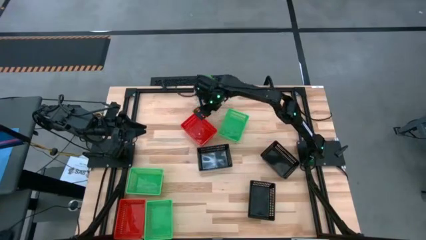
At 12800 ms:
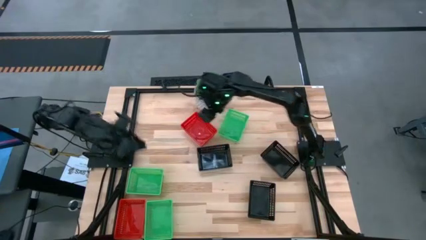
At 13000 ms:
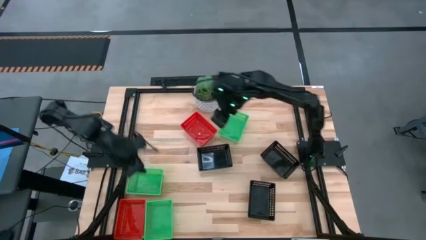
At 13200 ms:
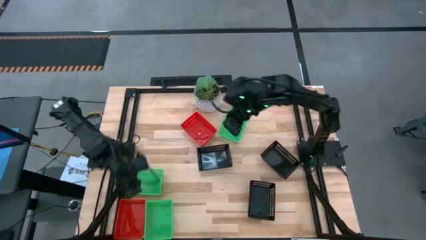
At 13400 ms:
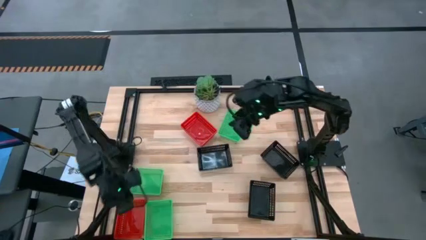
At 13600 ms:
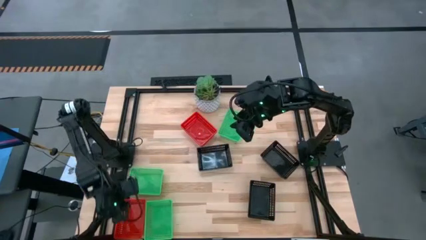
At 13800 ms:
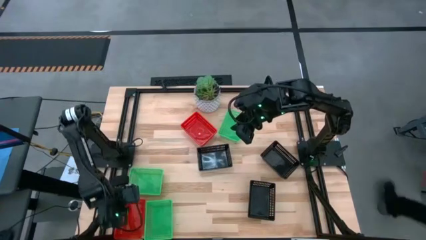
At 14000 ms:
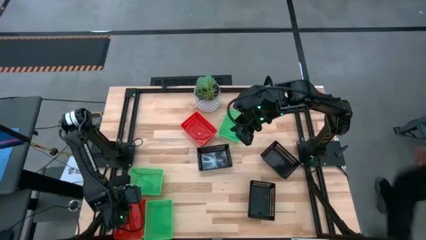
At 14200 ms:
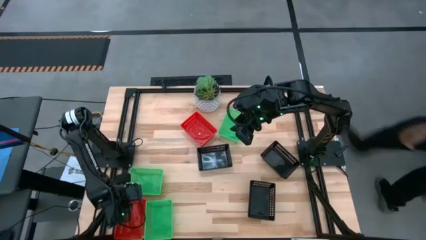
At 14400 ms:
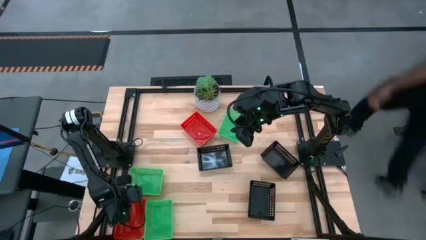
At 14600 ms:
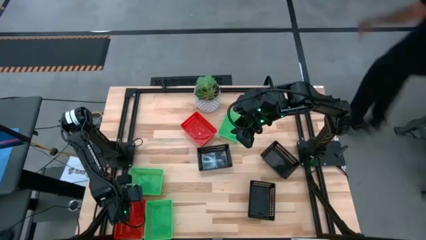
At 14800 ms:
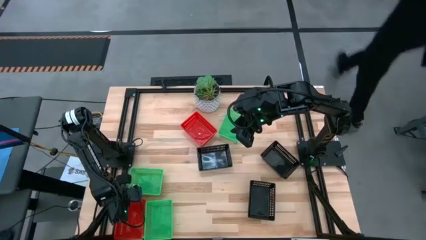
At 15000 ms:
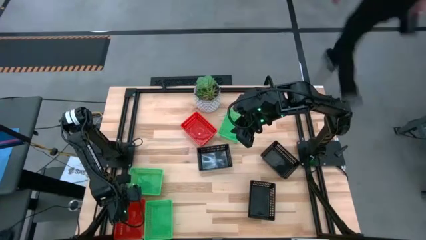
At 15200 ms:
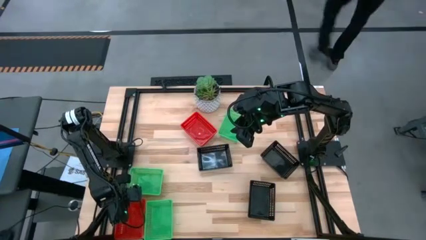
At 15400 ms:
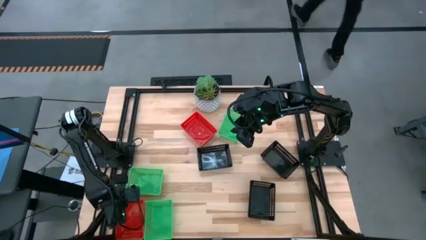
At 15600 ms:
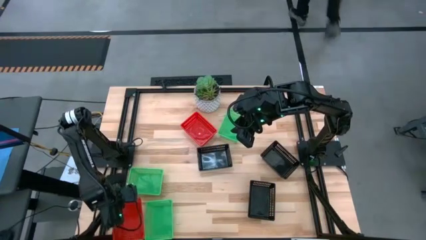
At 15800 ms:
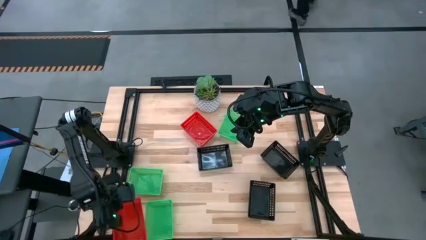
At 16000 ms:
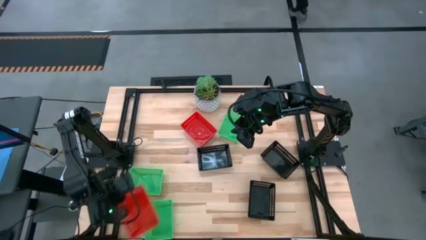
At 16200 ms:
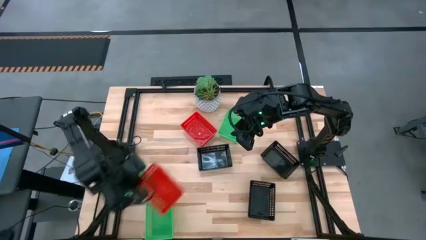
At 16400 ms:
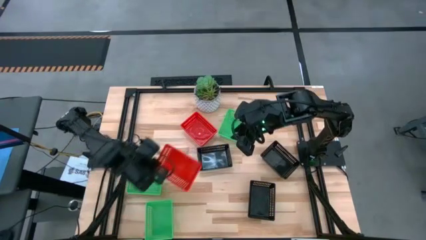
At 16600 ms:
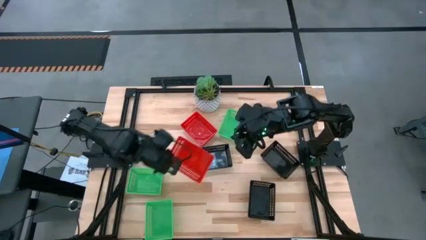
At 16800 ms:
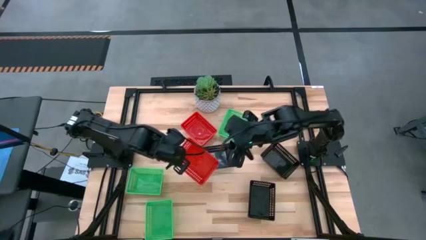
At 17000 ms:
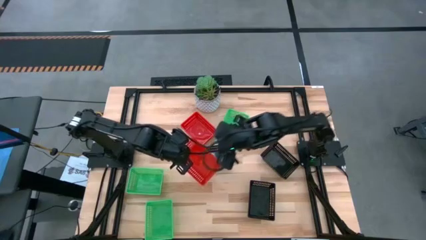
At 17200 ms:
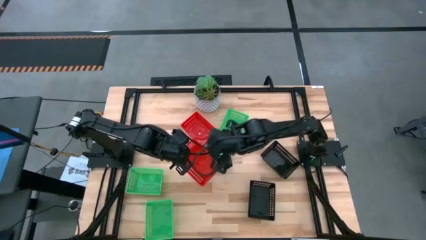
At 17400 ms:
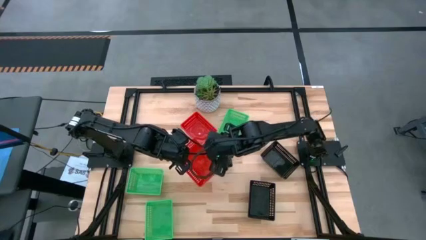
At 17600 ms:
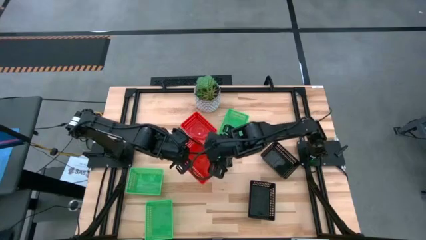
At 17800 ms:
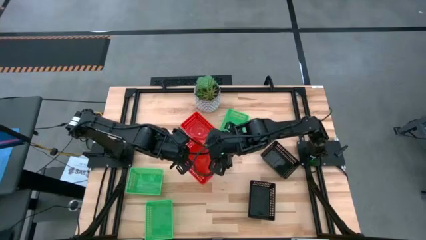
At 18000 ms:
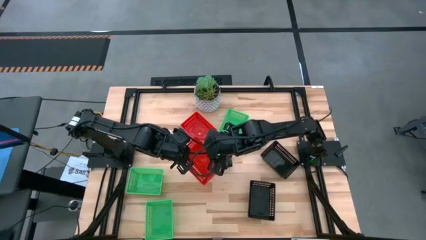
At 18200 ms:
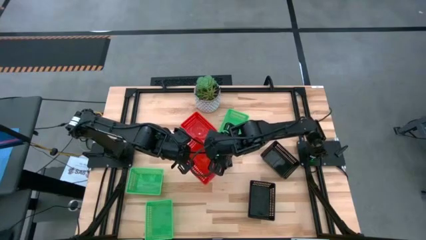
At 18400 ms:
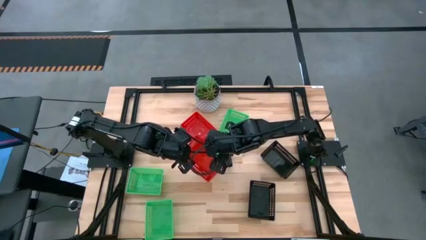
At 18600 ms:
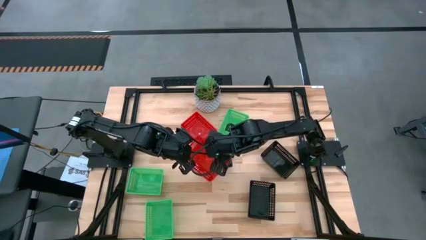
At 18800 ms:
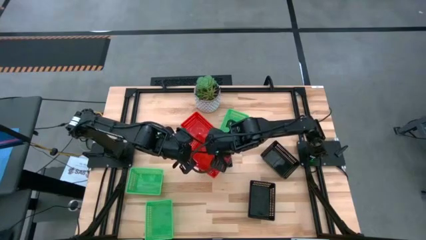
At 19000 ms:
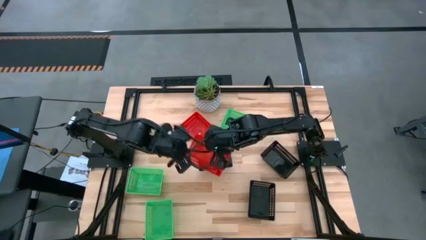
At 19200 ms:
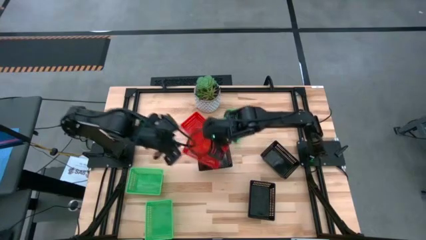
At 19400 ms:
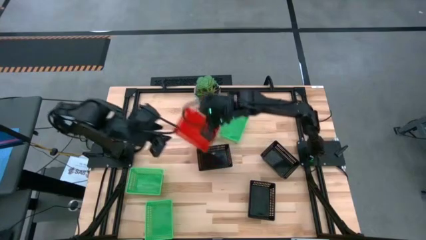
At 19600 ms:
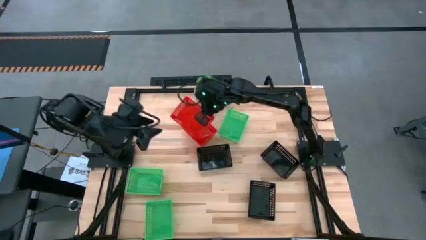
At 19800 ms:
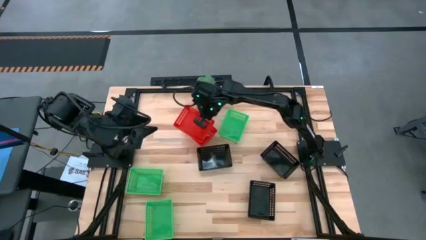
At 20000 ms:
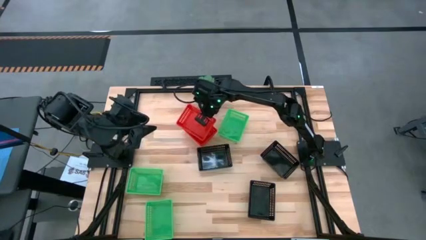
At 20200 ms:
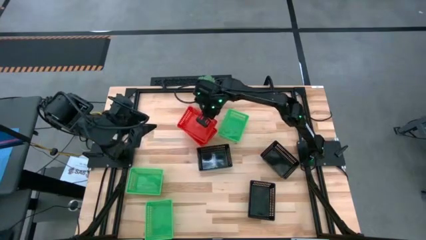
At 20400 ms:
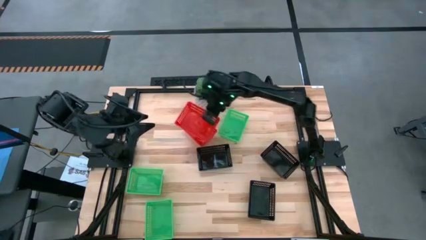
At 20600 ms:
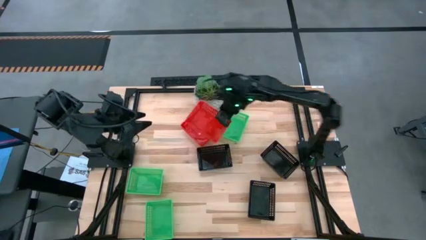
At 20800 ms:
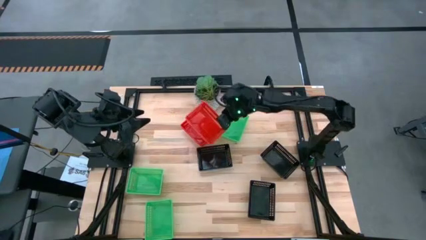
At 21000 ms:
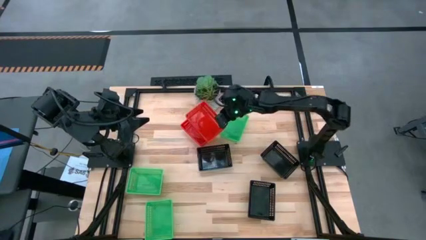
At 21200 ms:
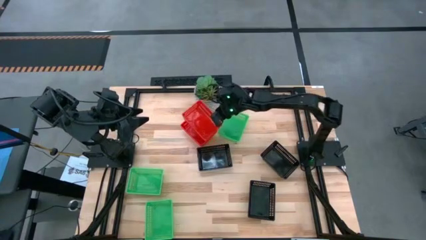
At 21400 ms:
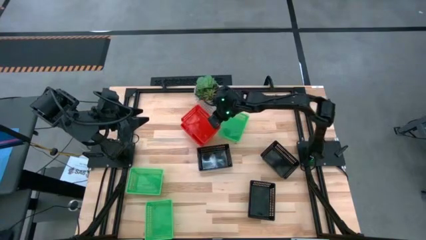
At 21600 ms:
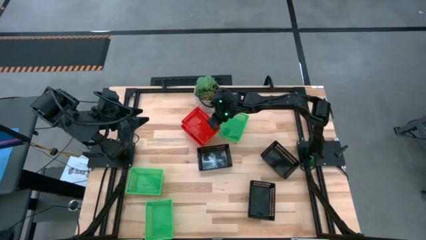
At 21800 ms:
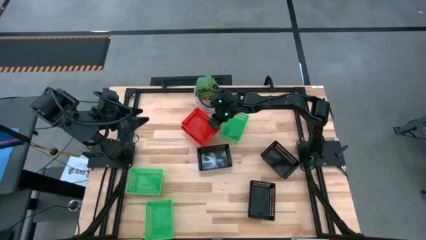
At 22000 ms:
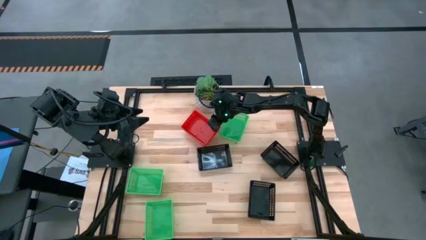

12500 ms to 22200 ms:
Stack the bottom red bin on the top red bins

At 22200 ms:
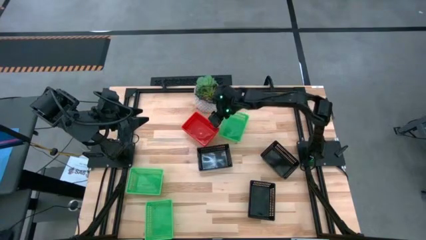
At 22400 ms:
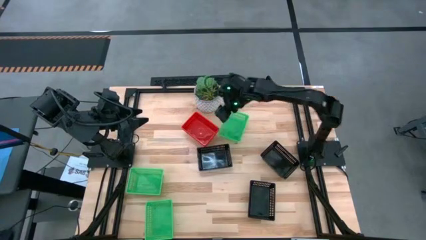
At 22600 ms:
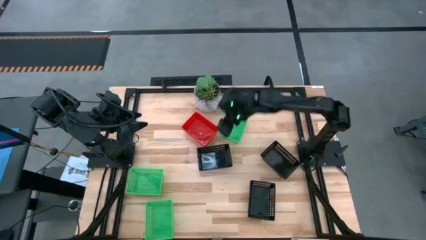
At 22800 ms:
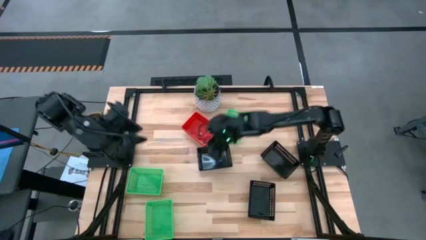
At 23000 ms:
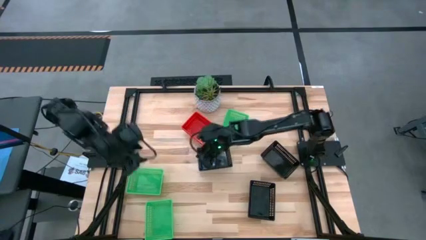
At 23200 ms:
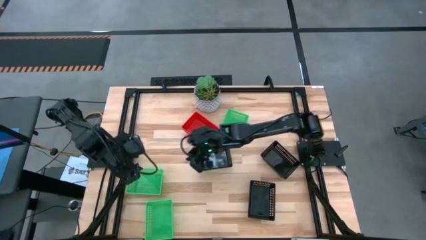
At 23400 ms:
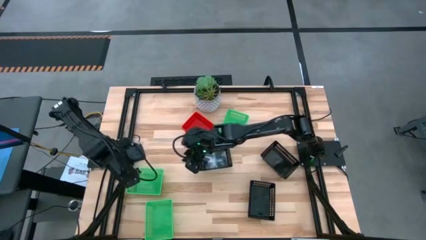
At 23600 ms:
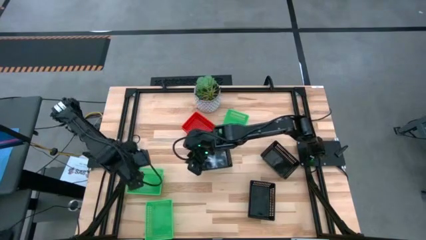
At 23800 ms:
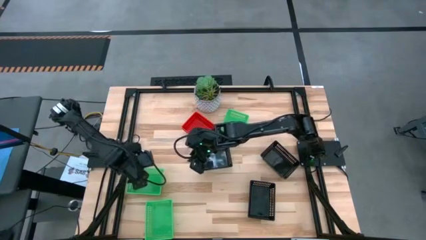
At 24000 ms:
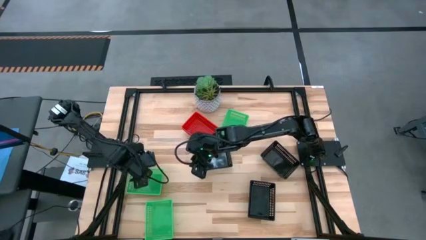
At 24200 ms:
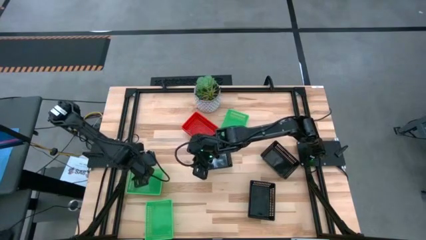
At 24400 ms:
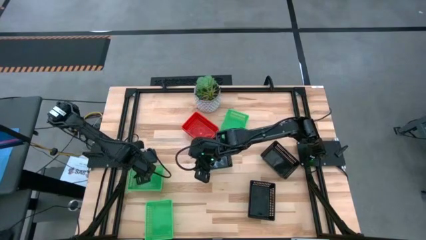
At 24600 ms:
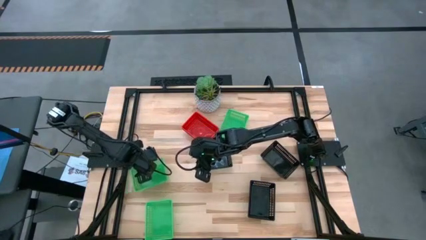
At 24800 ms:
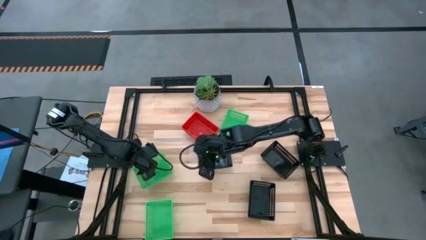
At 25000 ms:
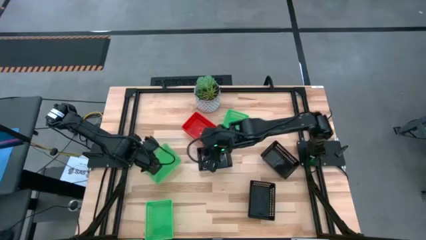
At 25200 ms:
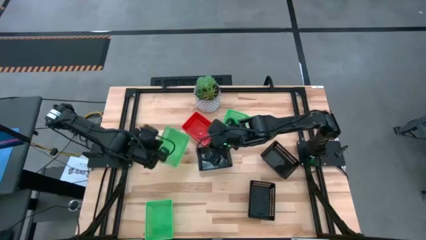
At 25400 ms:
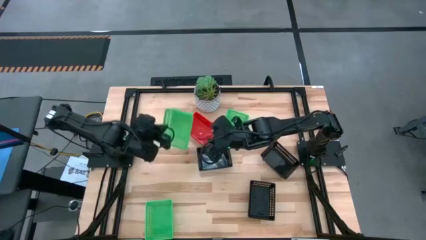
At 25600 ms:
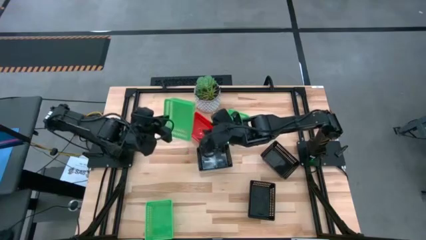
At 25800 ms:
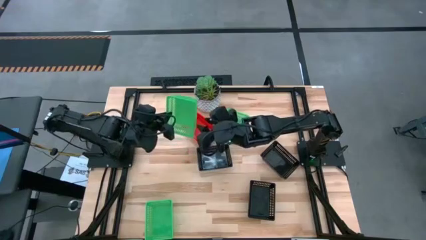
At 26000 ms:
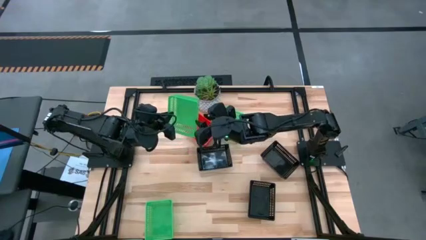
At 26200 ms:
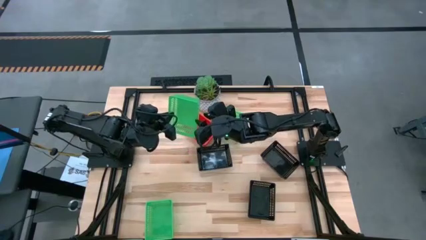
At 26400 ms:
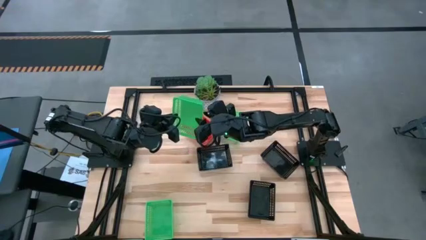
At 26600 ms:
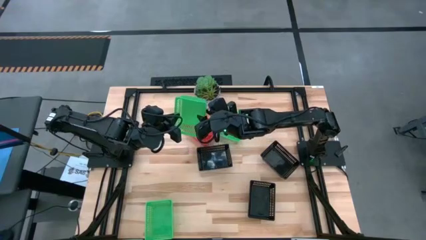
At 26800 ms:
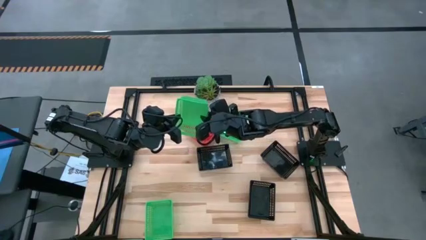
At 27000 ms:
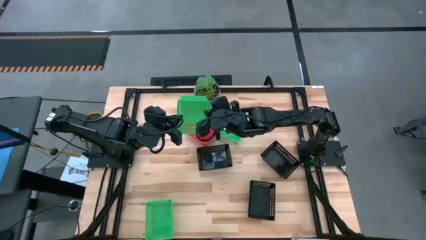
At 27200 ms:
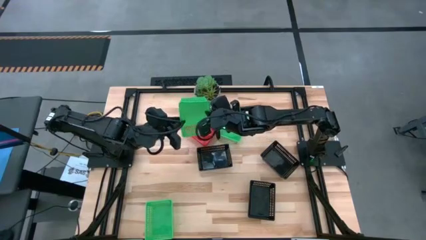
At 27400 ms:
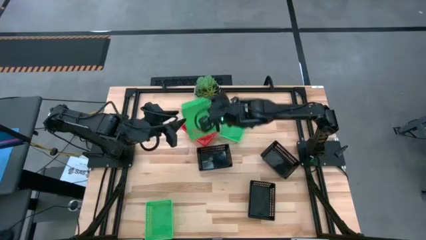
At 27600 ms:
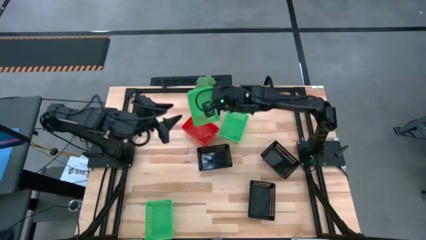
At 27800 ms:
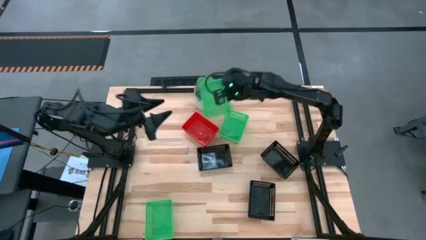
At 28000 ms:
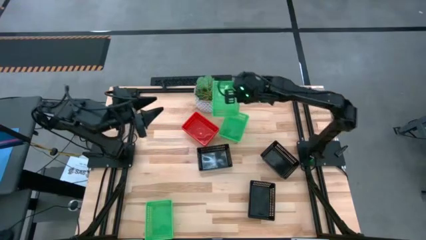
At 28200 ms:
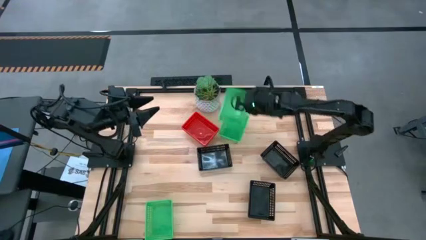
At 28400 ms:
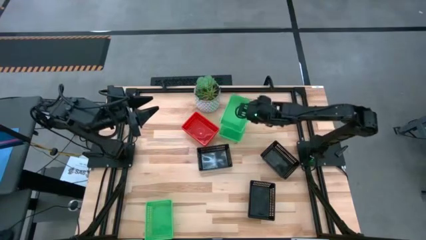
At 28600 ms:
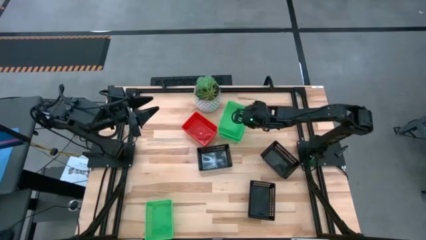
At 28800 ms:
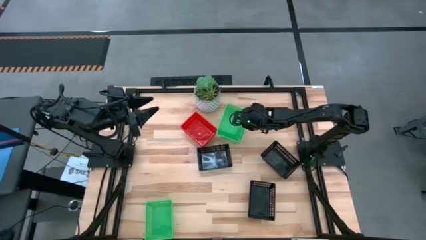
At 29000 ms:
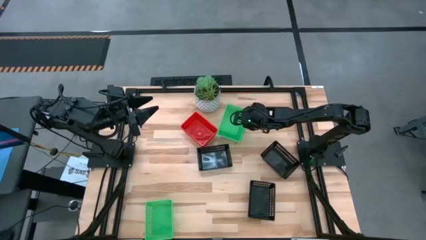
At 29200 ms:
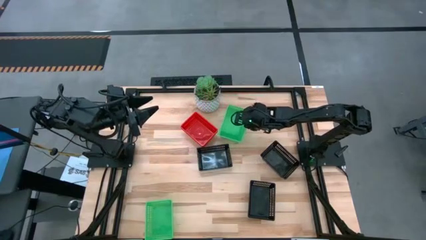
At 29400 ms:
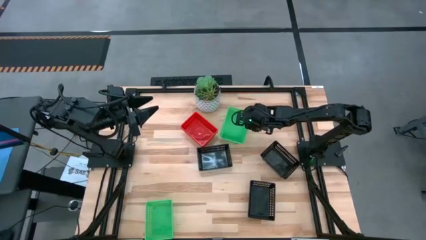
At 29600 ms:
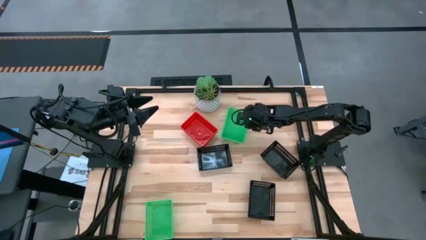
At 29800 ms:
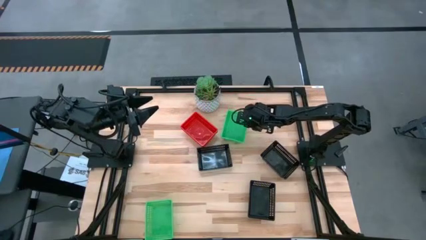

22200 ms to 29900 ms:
Stack the top left green bin on the right green bin
